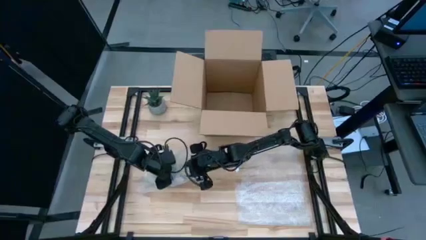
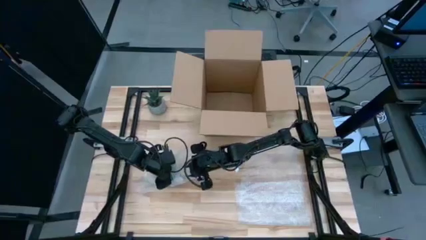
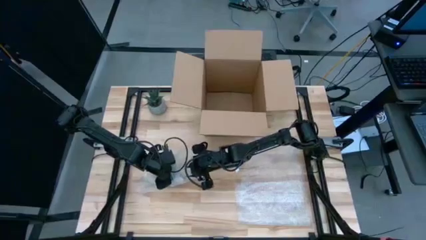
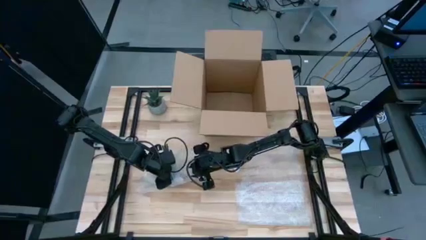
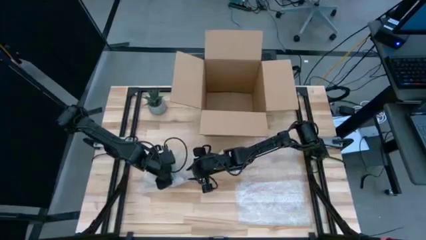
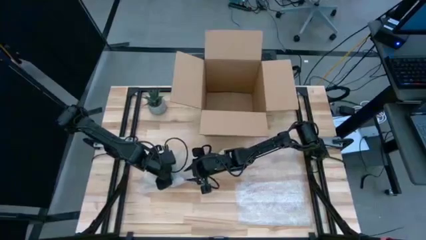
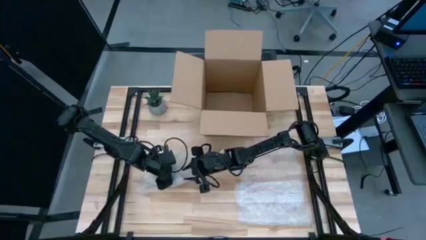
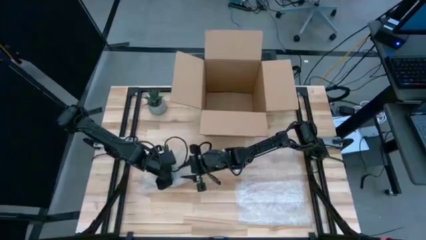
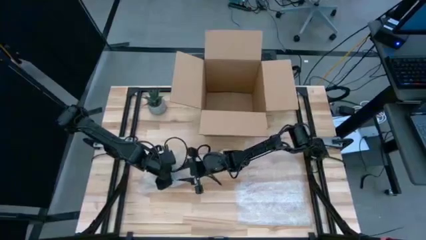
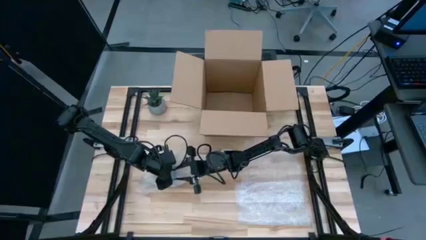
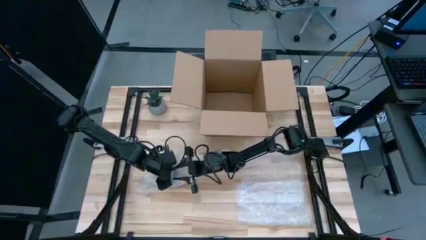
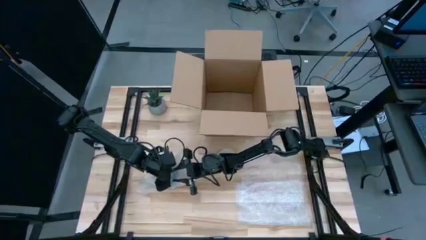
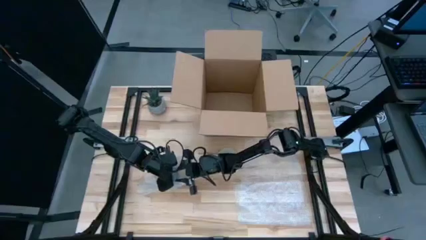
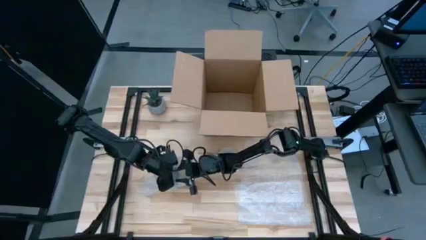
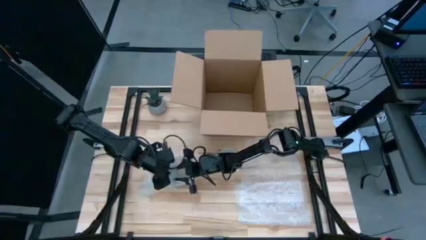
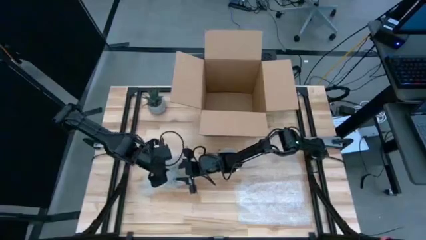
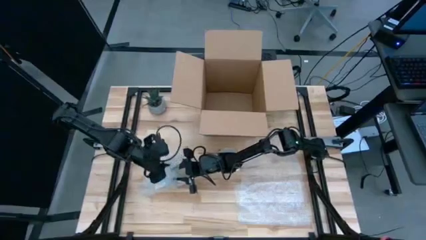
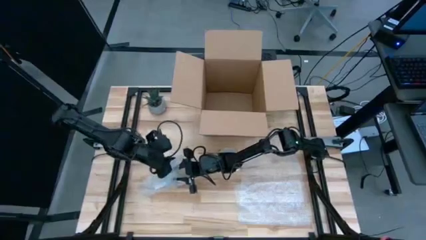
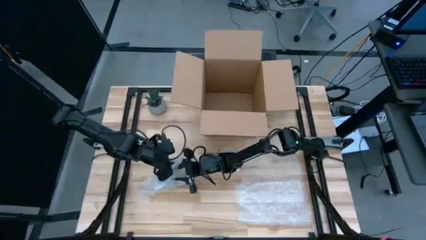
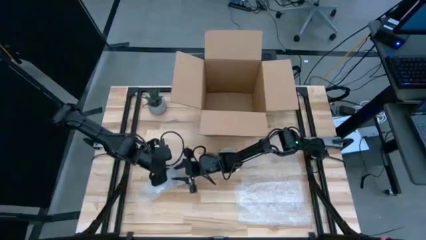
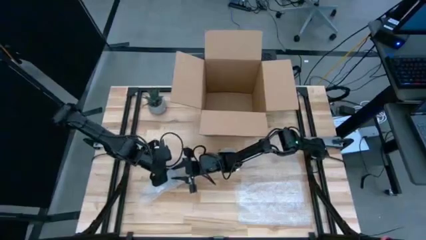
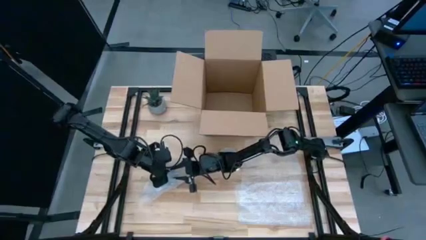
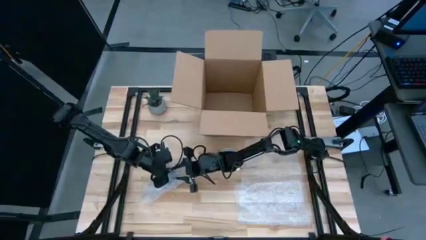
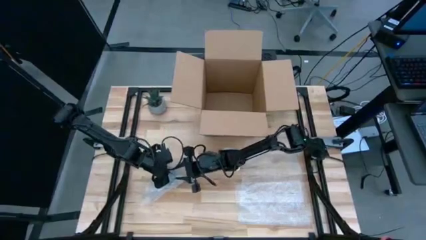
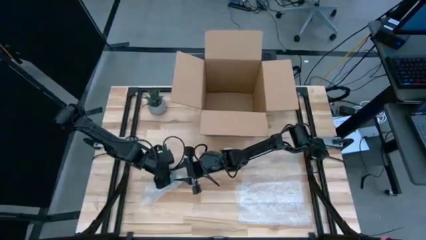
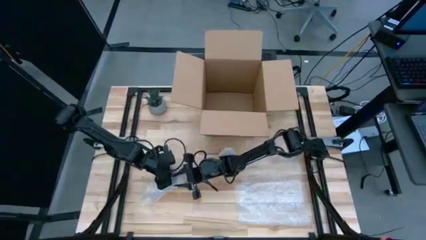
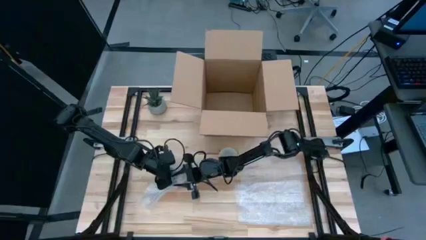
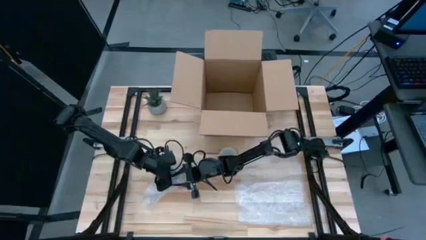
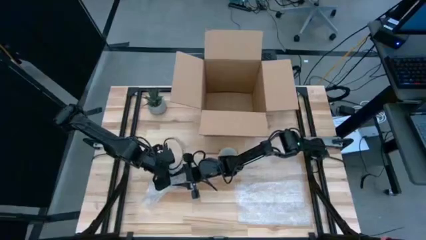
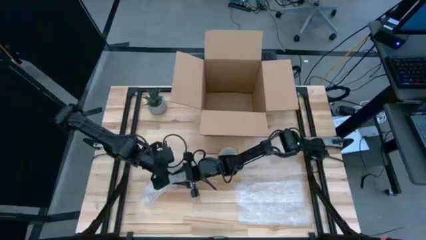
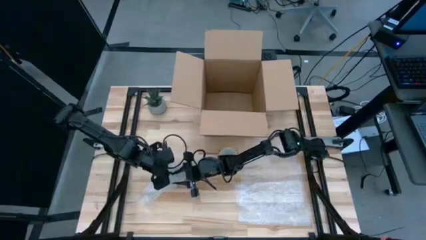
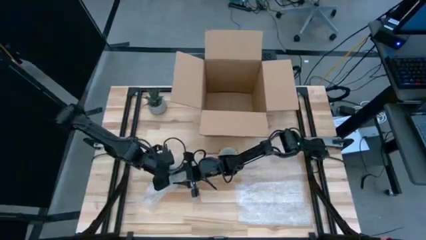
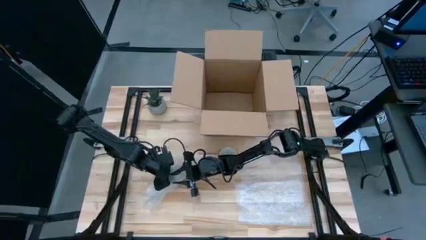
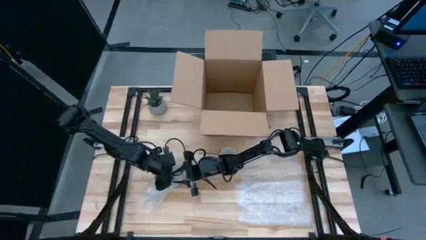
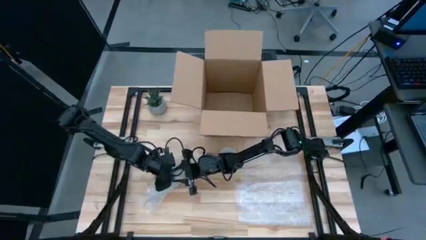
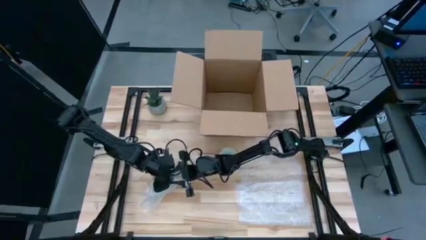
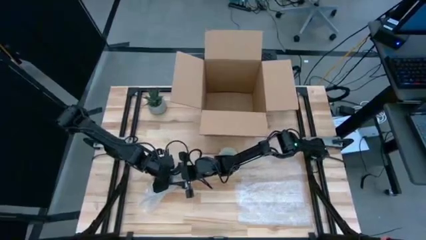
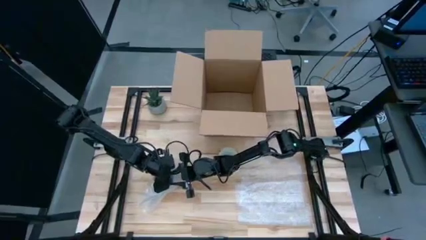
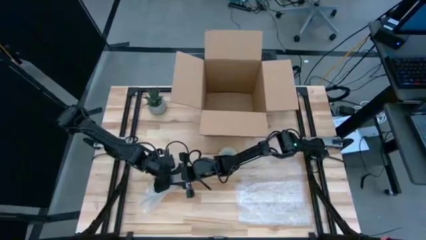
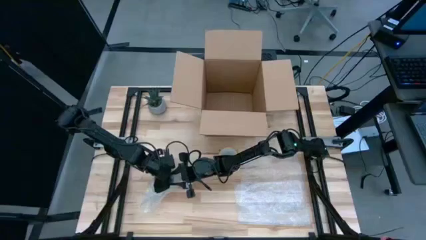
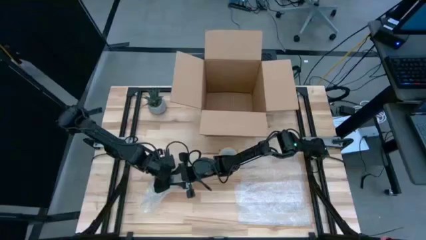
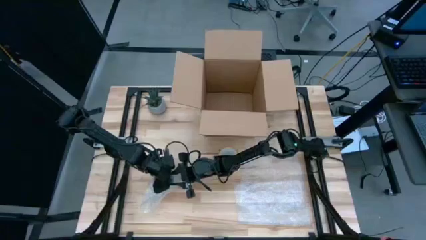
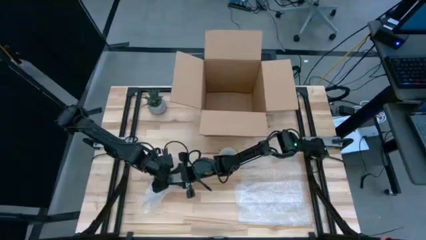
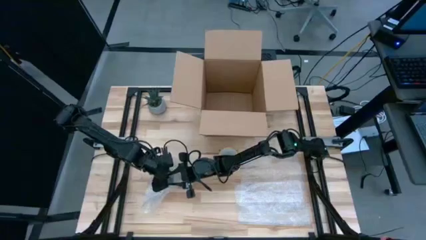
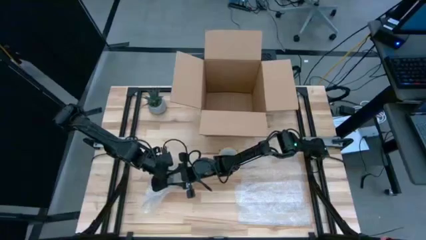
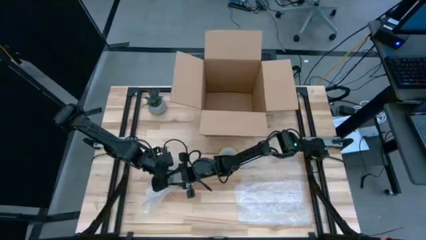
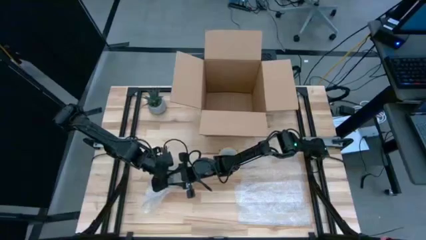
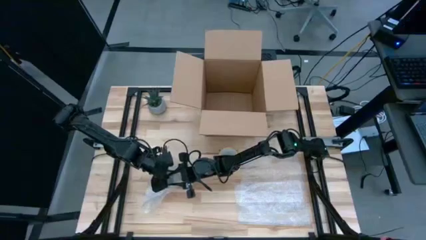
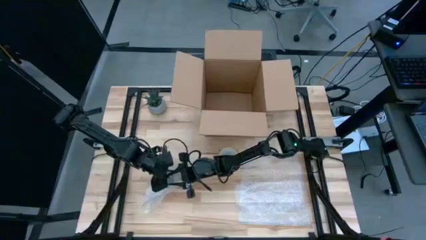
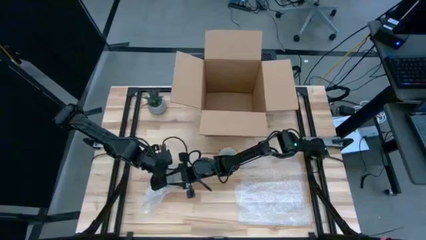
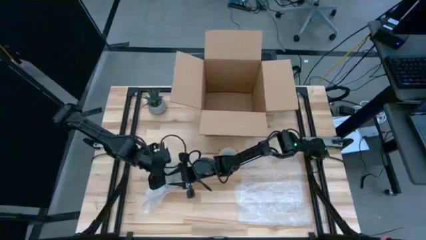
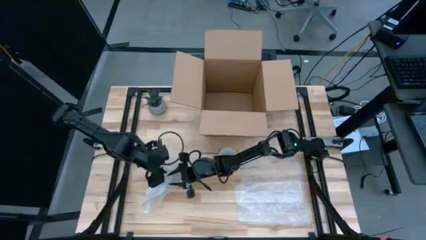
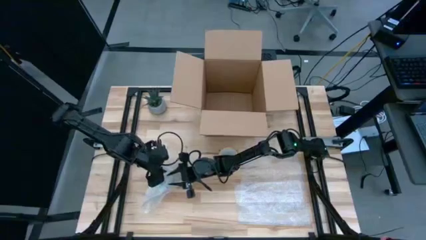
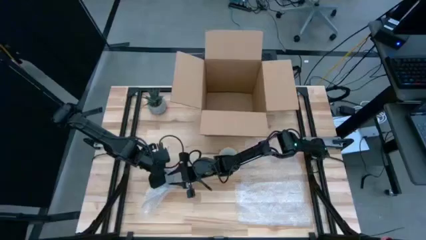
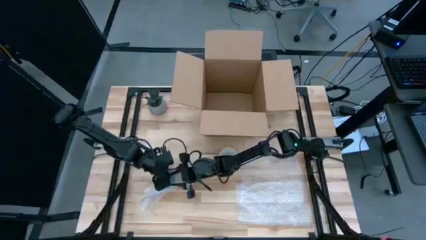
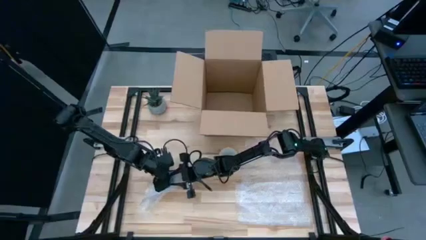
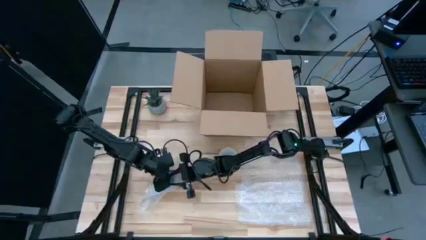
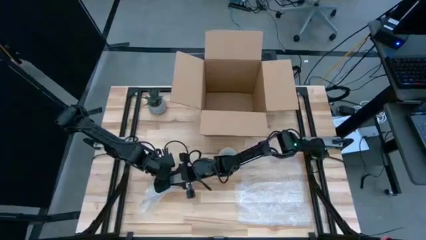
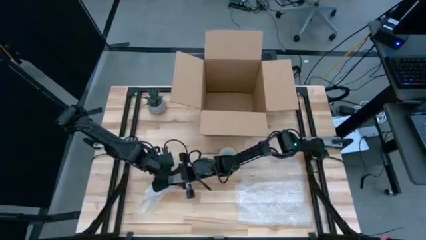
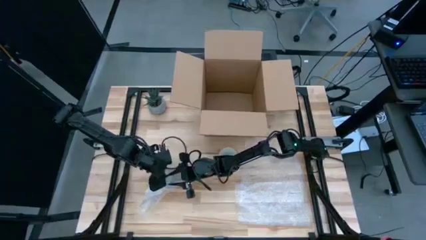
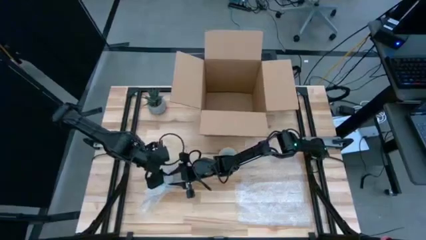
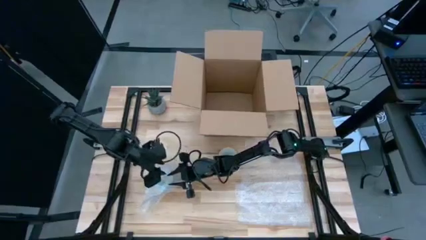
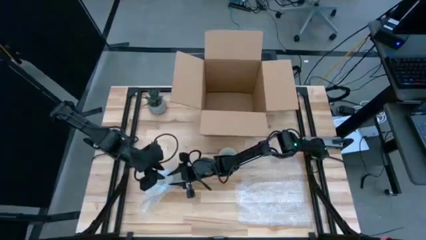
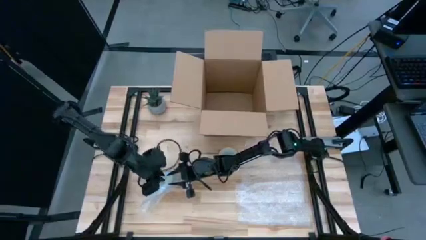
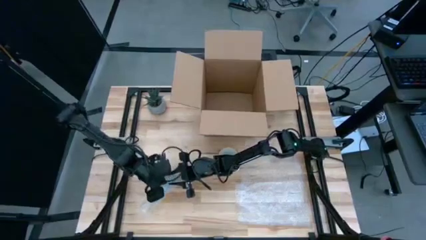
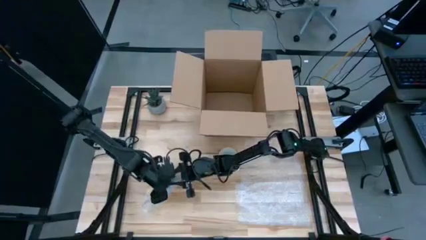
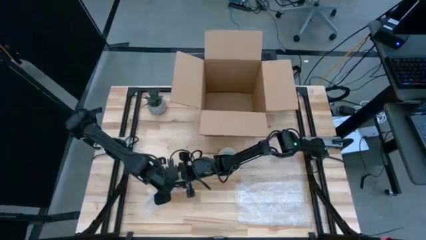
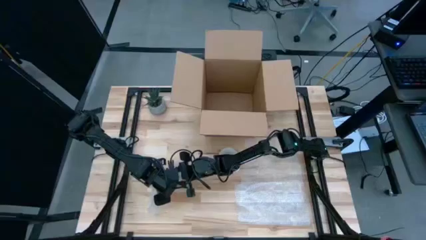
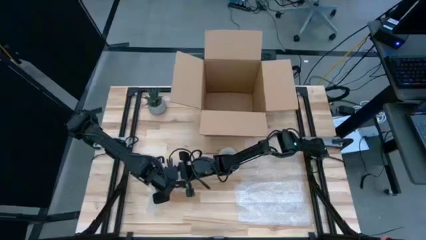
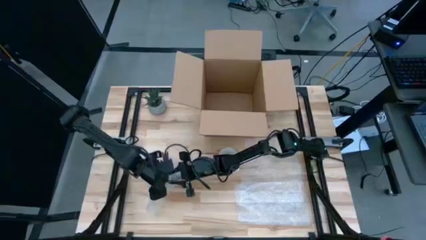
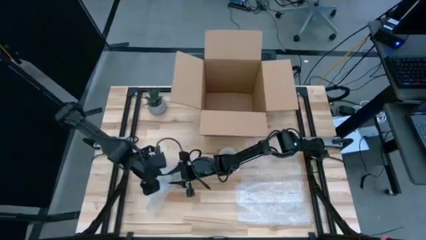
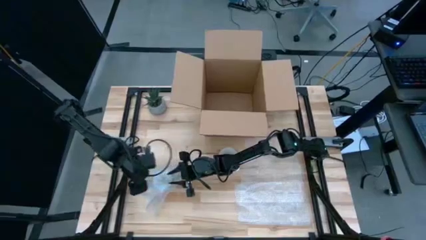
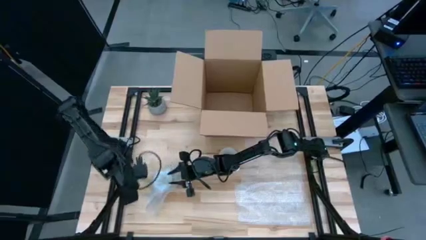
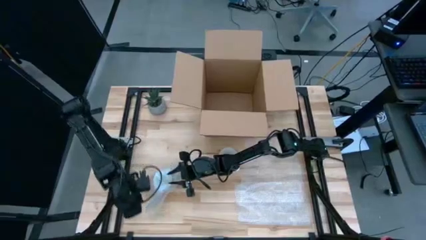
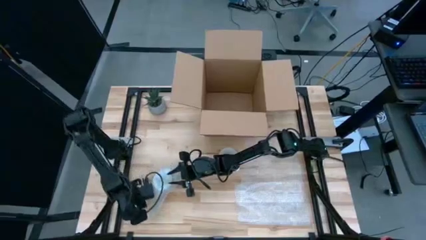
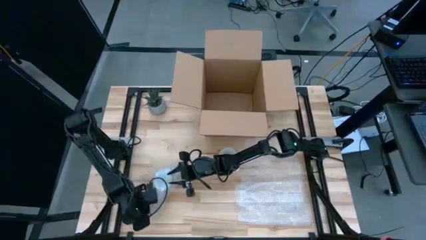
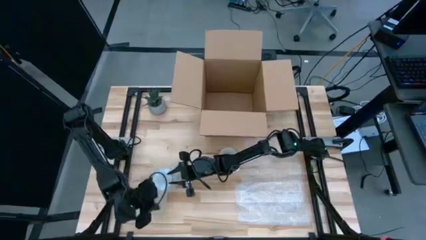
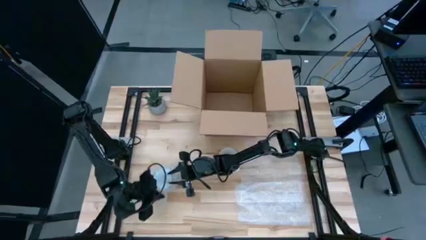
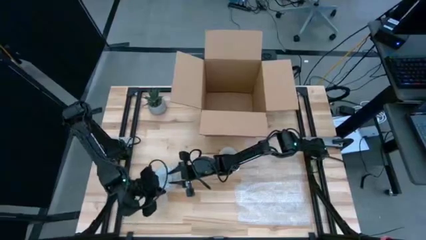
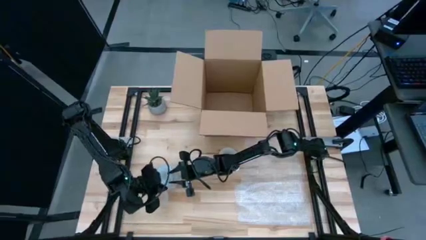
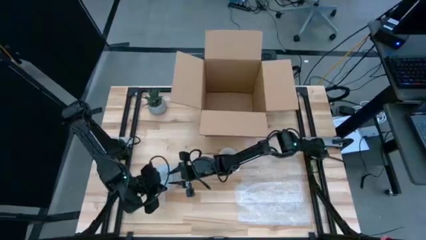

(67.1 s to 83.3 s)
Task: wrap mug
Wrap the red mug with the bubble wrap

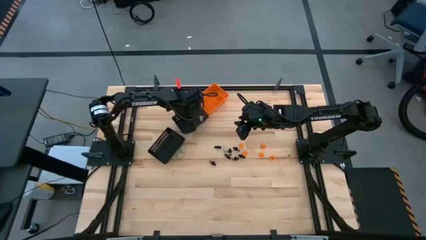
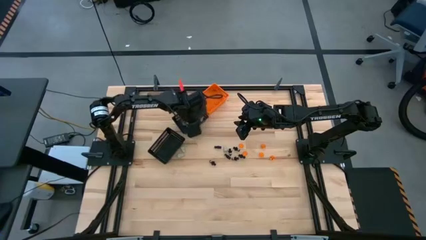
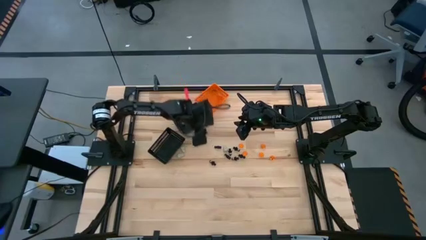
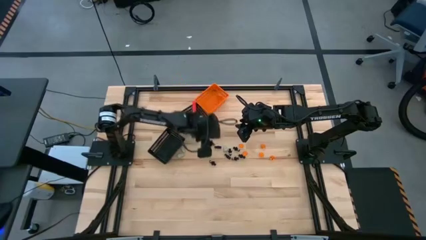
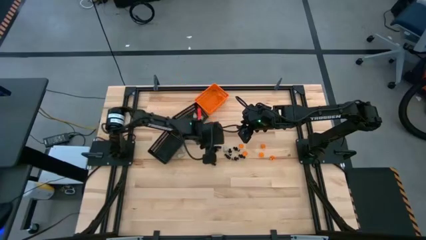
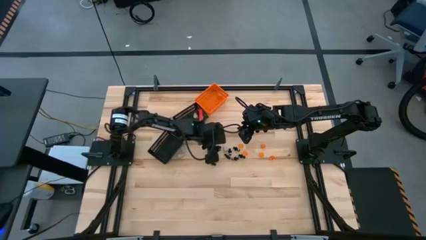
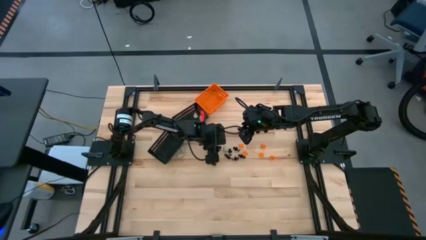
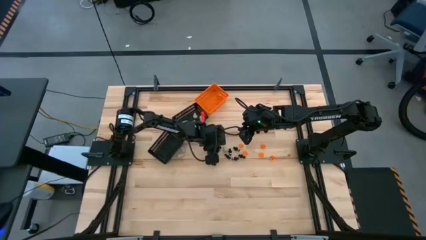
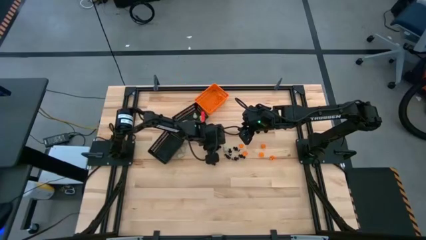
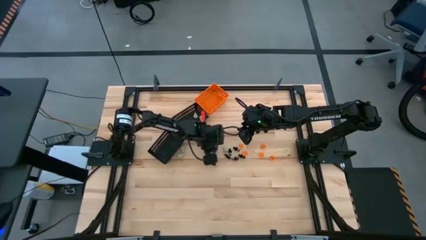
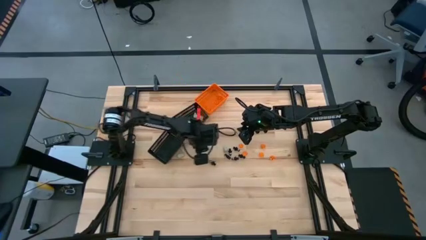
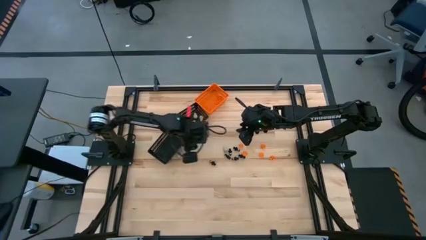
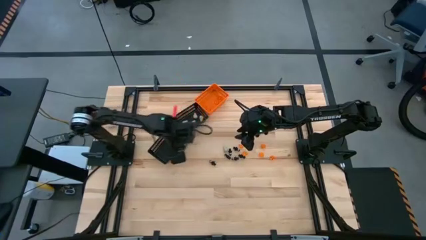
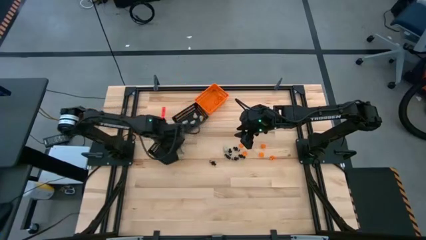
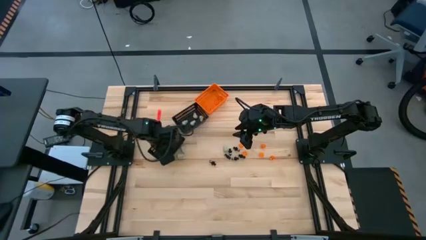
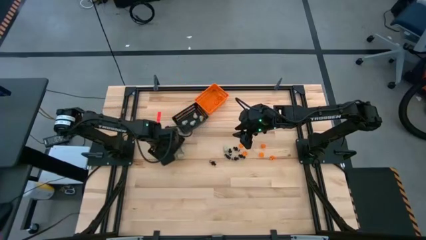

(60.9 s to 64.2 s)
Task: Sort Halloween decoration
Put the black voodoo toy into the bottom black bin
